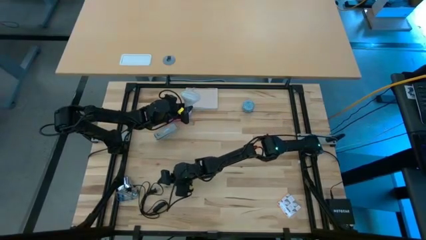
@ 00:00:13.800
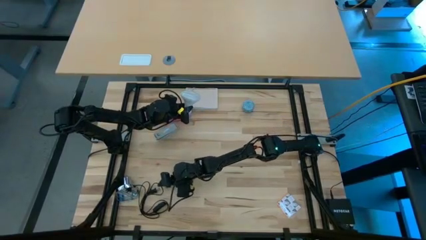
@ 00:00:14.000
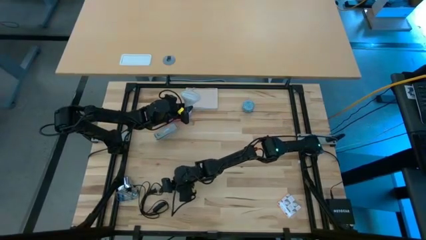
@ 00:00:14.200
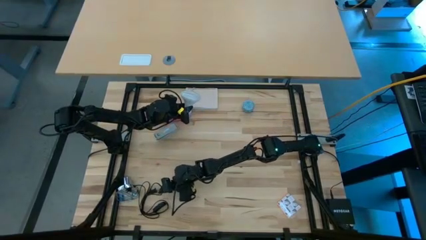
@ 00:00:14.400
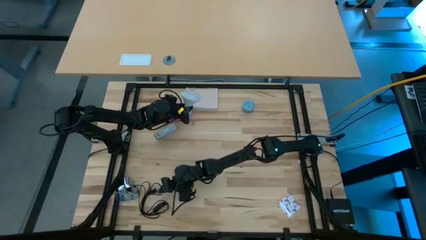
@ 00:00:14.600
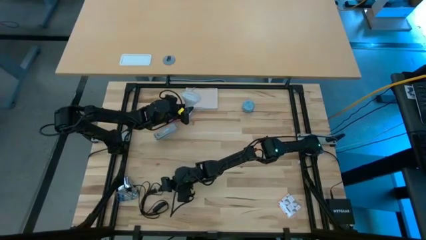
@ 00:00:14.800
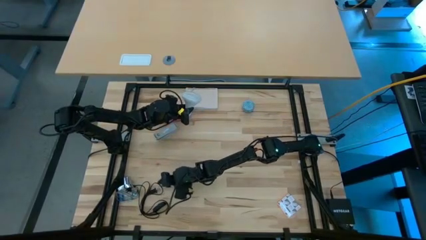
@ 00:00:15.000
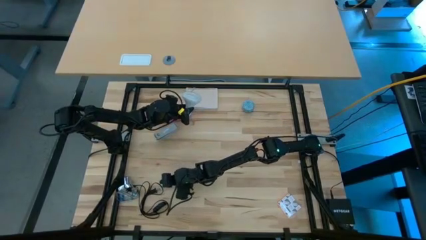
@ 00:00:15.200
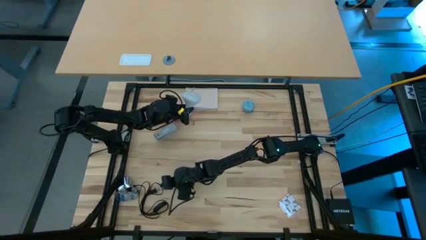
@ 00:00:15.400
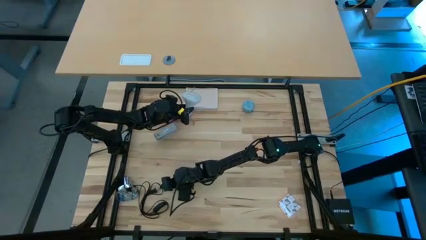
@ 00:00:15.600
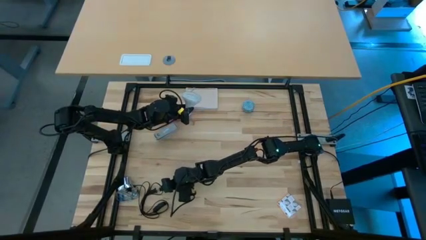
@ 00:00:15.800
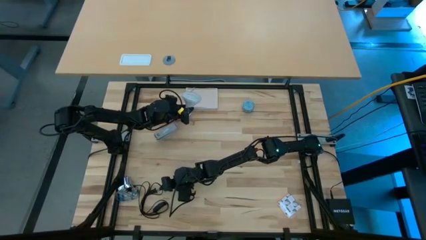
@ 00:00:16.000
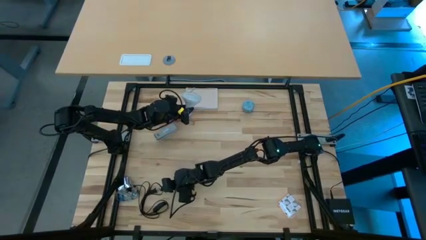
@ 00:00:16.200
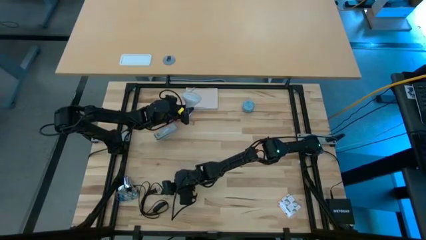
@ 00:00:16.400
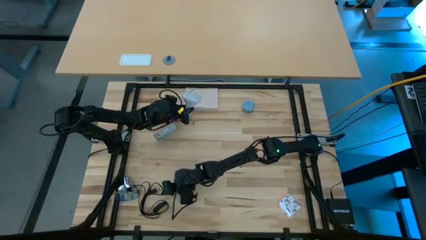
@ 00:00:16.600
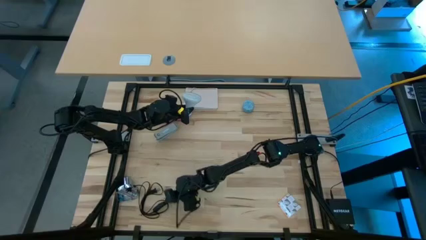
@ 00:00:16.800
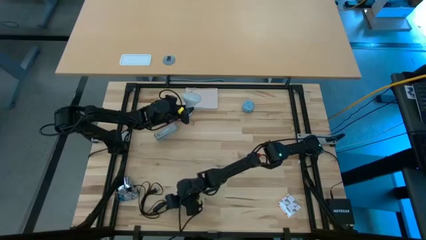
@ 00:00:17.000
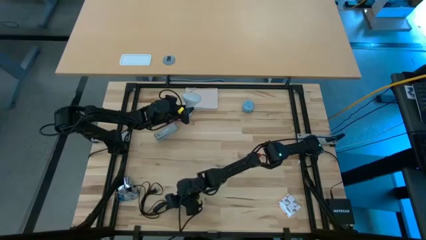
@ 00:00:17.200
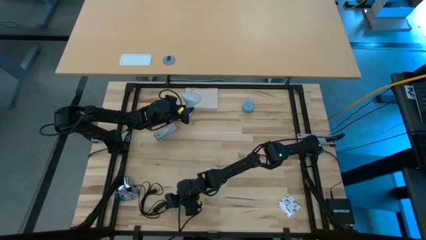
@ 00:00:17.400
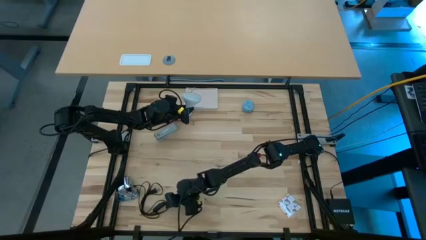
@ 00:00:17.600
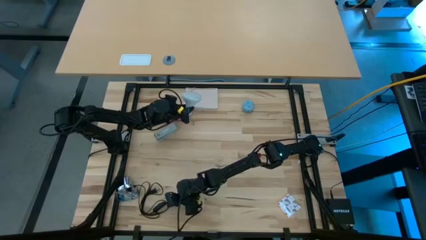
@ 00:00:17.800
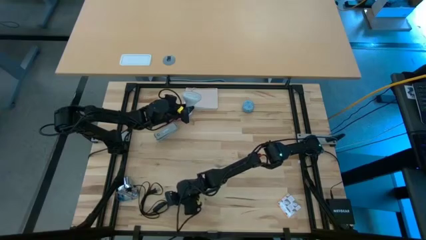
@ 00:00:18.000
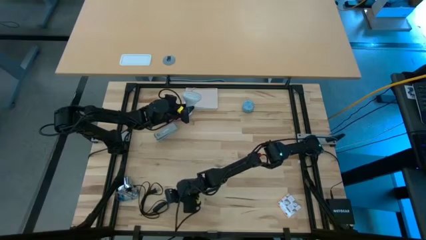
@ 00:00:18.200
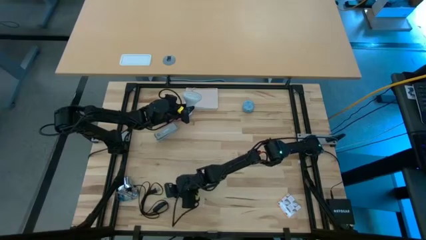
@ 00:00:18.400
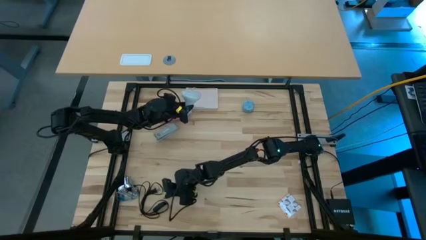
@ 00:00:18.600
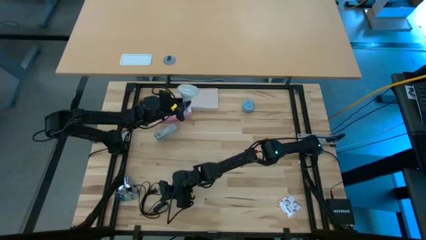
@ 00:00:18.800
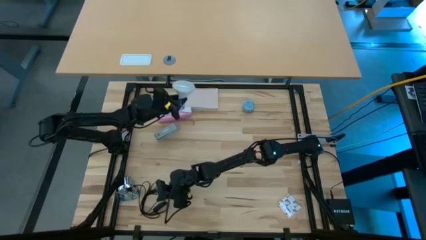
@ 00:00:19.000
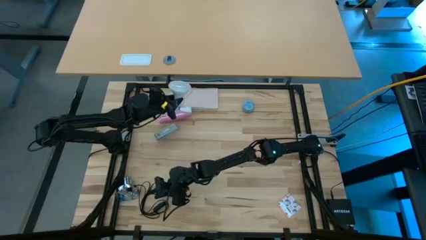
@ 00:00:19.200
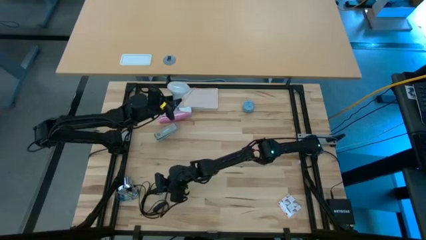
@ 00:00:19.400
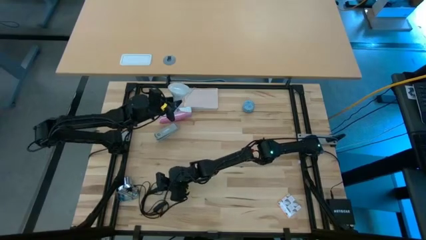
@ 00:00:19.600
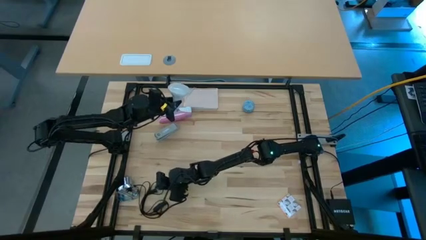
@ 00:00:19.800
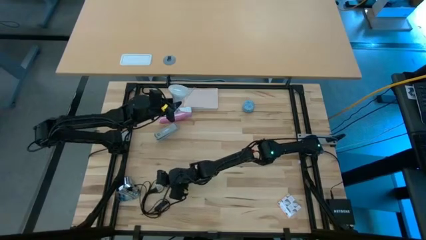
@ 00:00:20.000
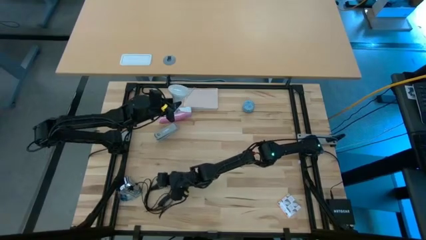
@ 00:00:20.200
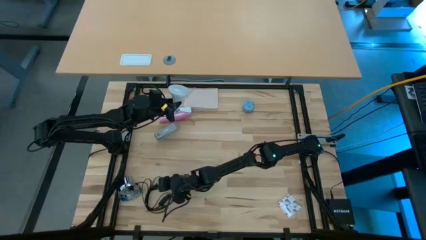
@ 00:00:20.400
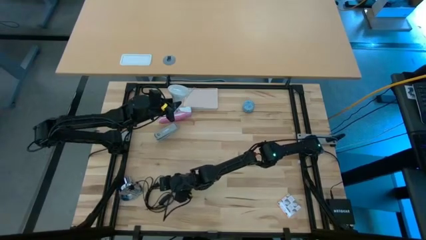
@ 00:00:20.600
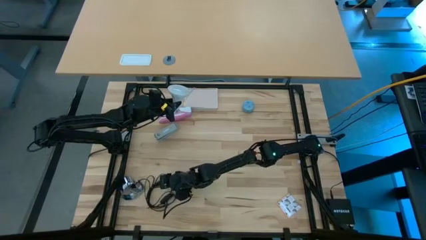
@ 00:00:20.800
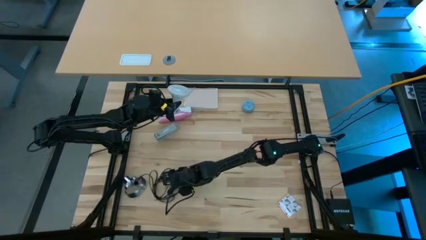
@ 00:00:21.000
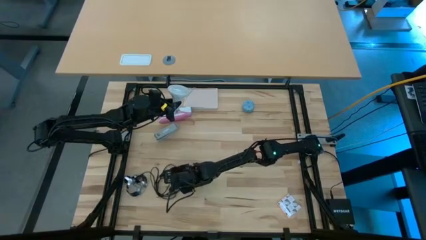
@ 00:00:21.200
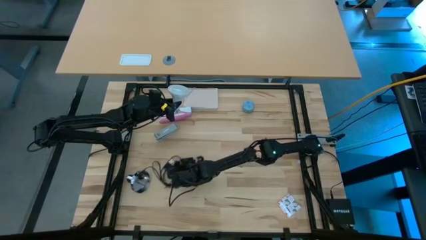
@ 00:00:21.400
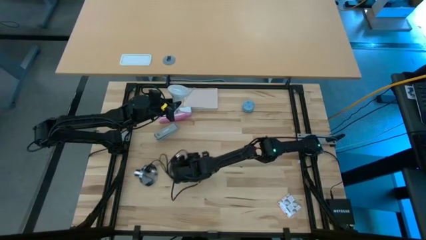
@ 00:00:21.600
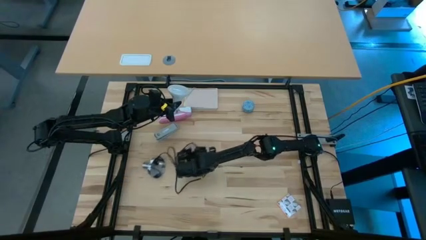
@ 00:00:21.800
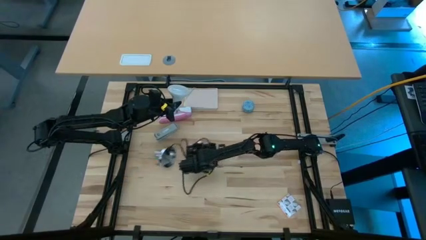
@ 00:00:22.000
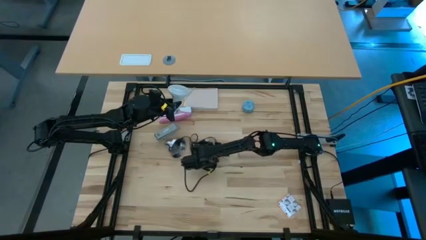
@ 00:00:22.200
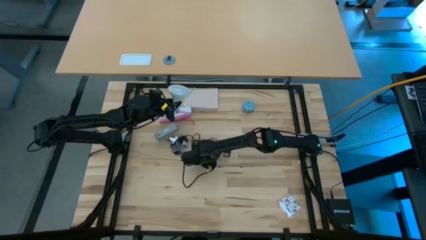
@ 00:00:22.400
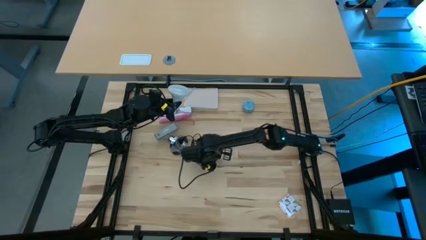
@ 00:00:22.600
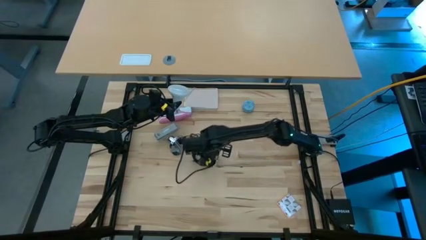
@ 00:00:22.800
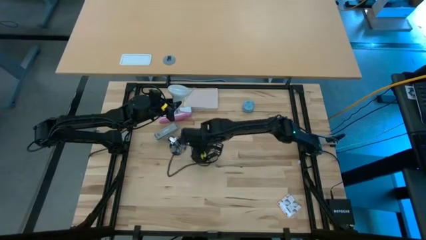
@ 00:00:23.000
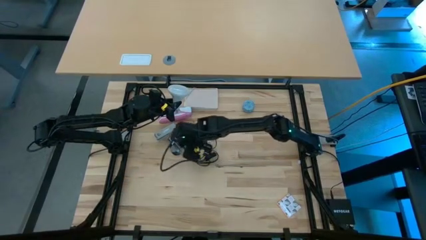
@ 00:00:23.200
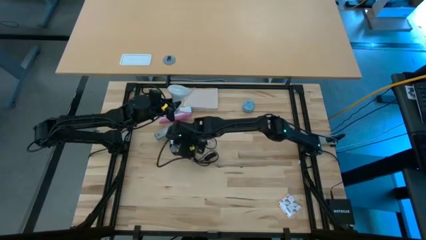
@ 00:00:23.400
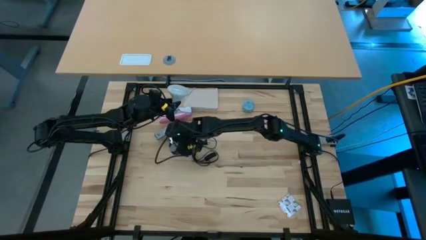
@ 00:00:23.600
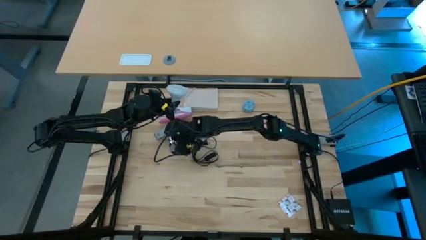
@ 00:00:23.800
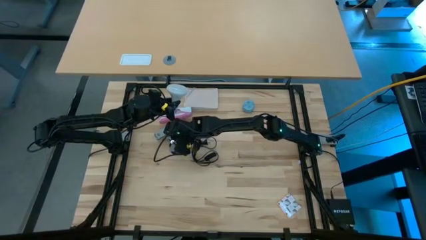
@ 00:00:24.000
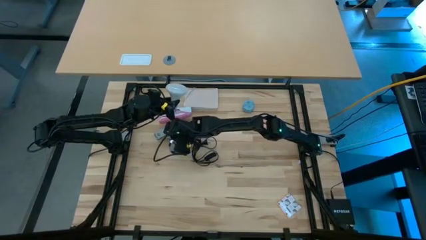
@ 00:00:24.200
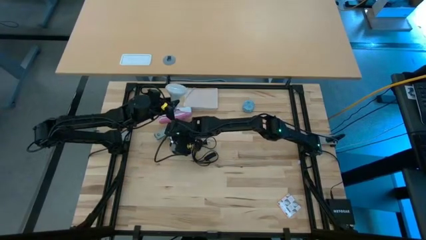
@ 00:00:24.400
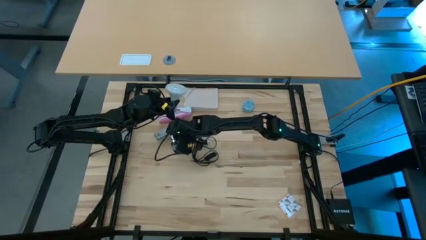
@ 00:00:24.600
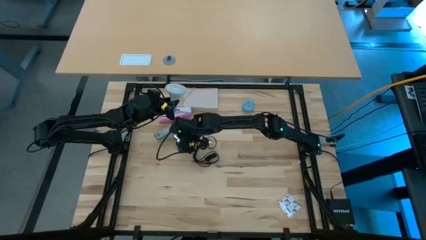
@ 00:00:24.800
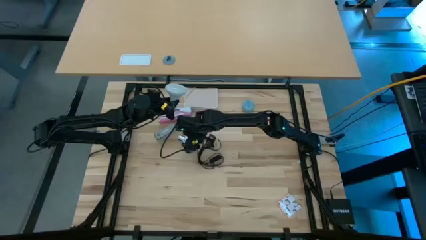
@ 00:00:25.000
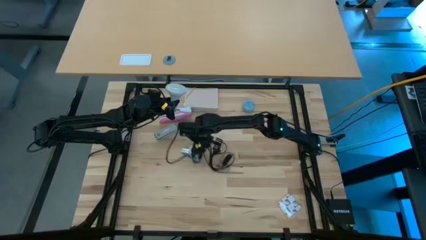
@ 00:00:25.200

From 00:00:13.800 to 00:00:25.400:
Task: Screw lightbulb
Insert the white lightbulb into the desk lamp

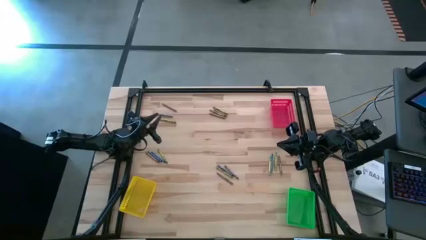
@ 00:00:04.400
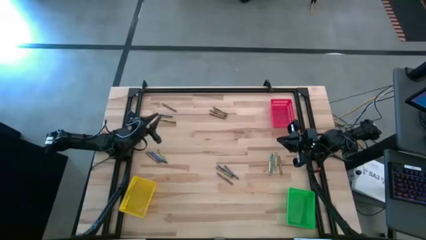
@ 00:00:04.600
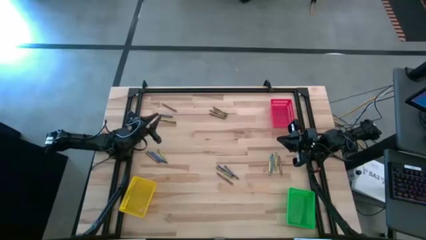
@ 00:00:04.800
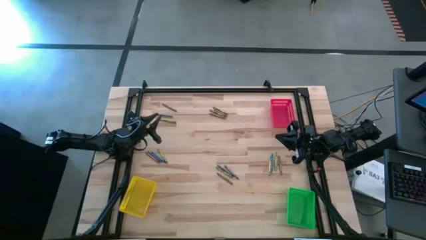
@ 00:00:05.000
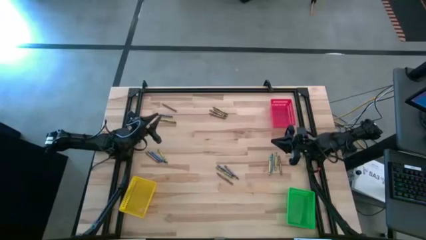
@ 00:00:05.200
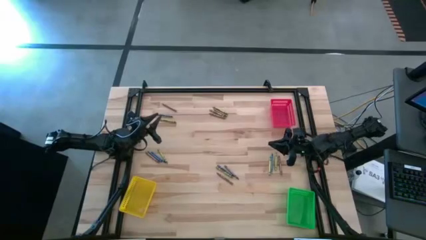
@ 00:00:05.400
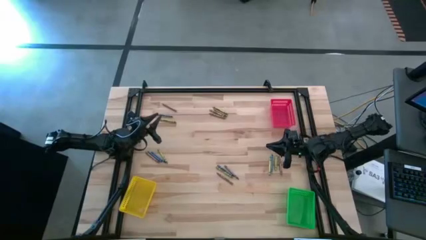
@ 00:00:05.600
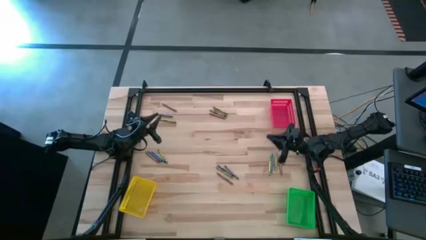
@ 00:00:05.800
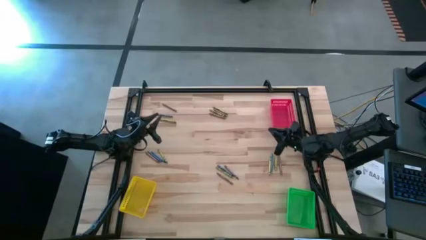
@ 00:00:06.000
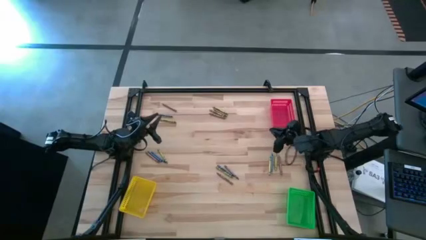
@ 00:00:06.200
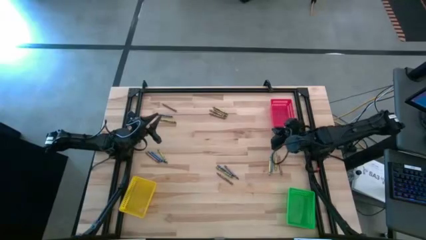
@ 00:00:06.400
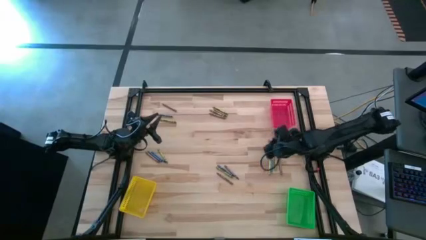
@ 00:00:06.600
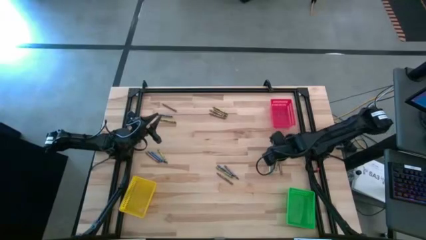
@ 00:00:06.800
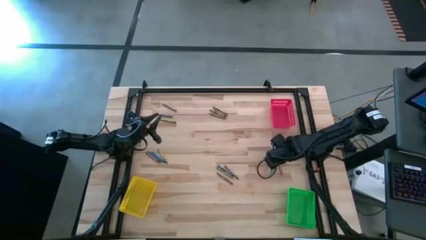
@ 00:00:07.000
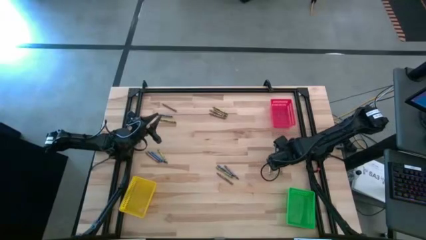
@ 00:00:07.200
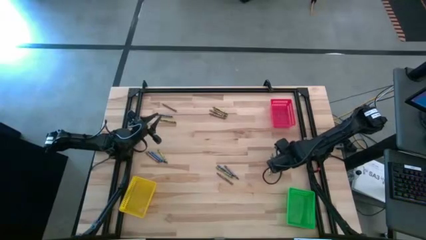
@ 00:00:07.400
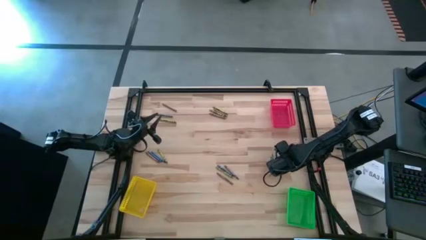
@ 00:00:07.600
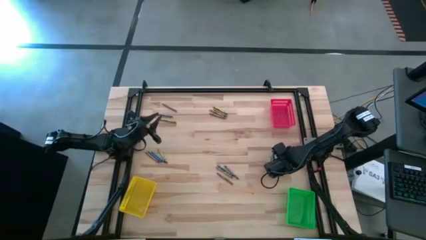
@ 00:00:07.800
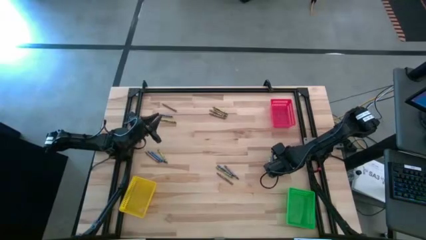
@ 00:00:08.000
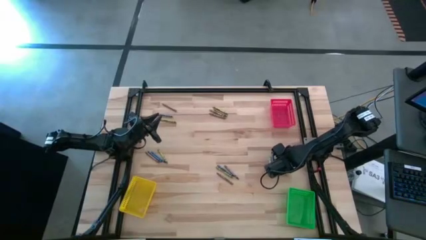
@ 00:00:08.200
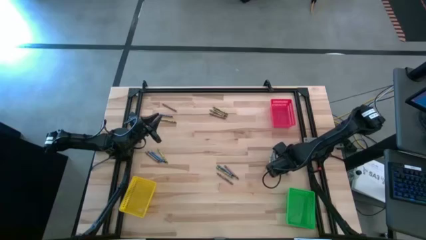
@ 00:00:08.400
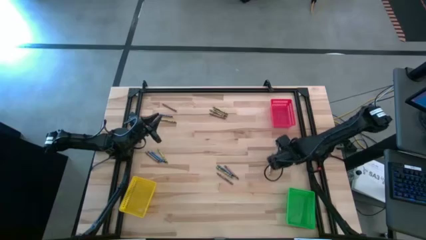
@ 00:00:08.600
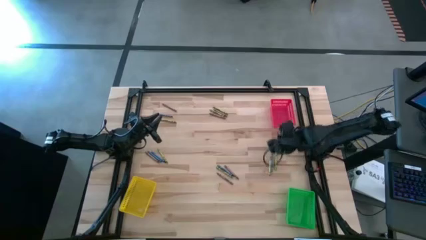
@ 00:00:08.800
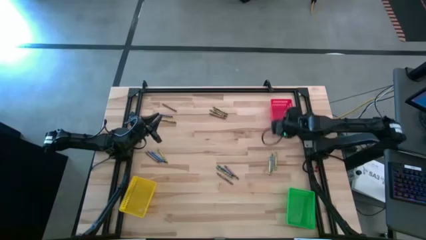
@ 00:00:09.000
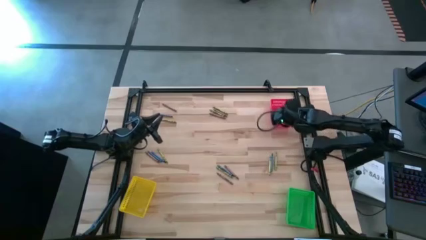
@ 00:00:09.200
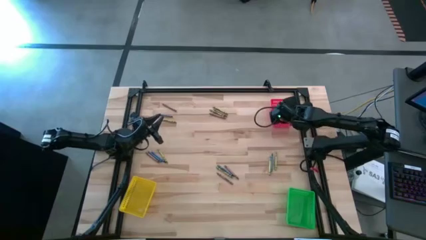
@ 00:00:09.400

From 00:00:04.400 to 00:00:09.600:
Task: Sort crayons
Put the brown crayon into the red bin
